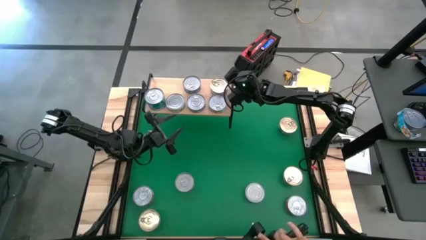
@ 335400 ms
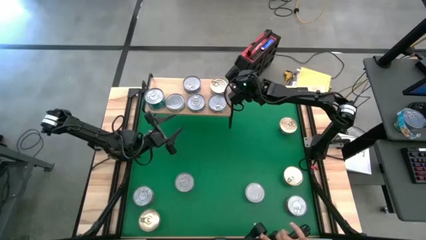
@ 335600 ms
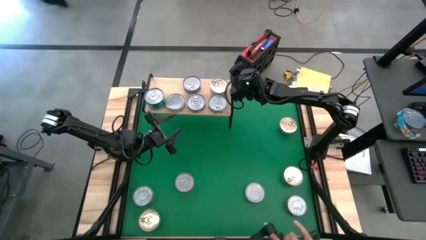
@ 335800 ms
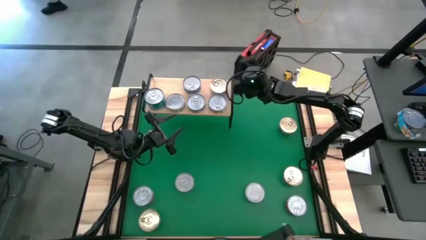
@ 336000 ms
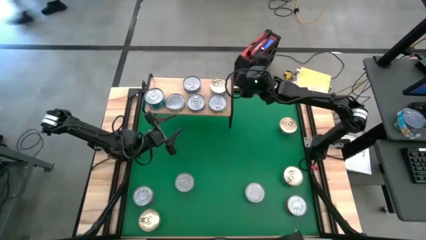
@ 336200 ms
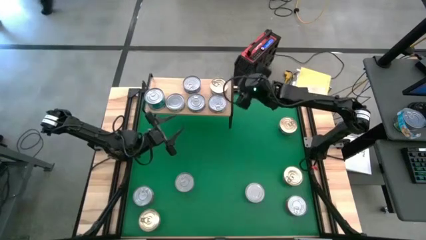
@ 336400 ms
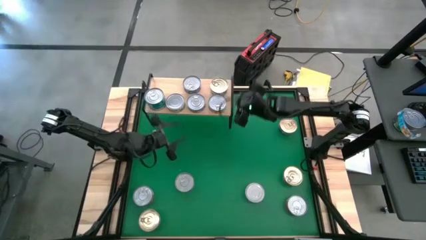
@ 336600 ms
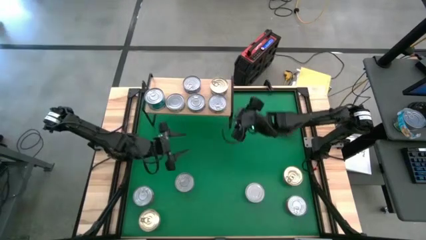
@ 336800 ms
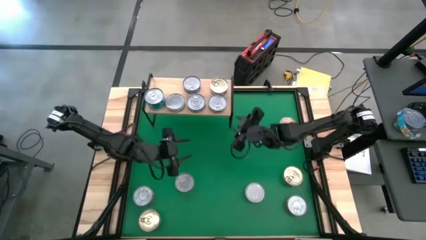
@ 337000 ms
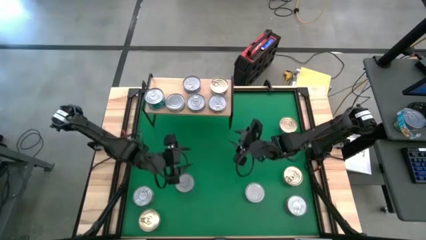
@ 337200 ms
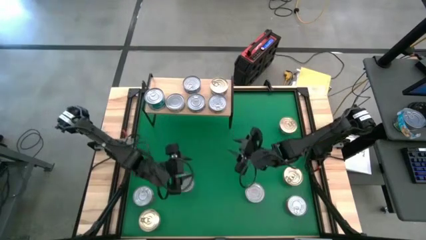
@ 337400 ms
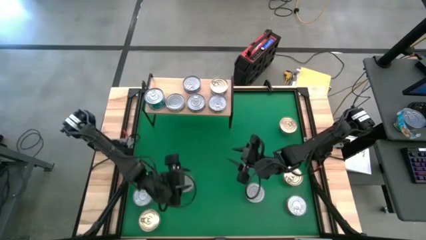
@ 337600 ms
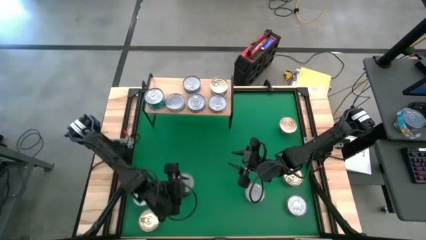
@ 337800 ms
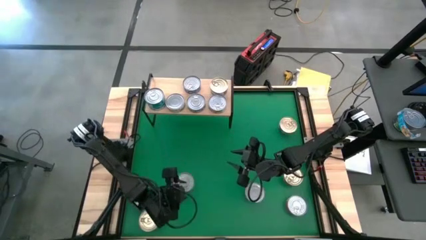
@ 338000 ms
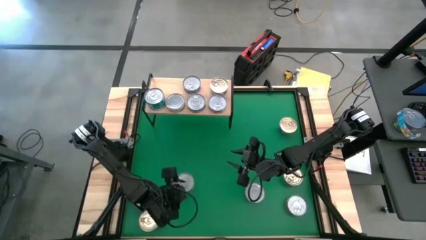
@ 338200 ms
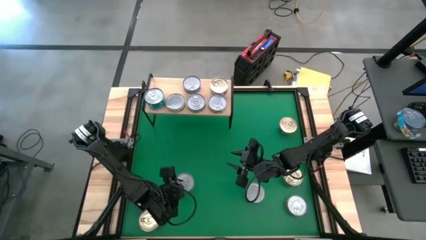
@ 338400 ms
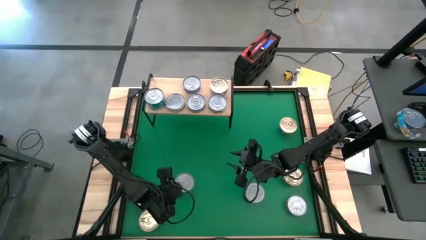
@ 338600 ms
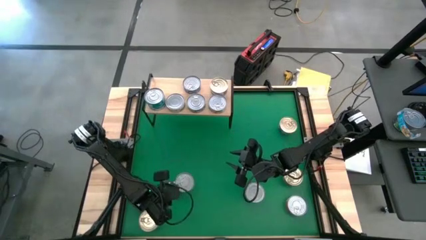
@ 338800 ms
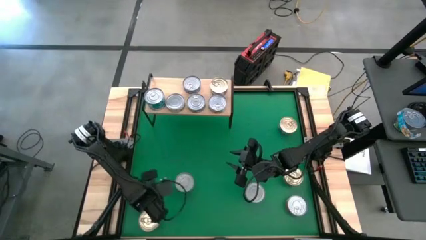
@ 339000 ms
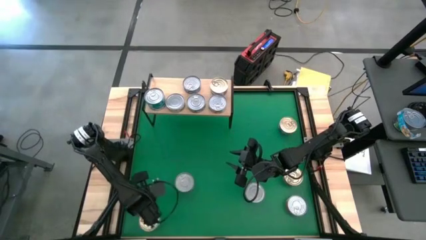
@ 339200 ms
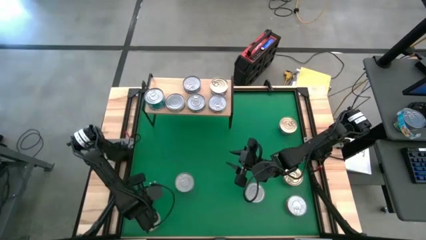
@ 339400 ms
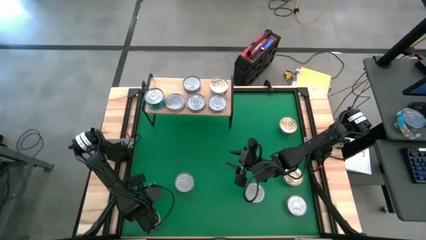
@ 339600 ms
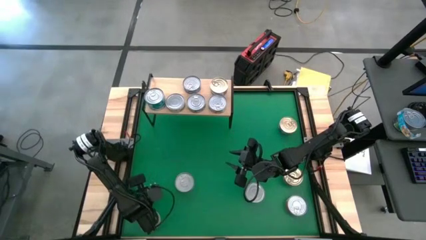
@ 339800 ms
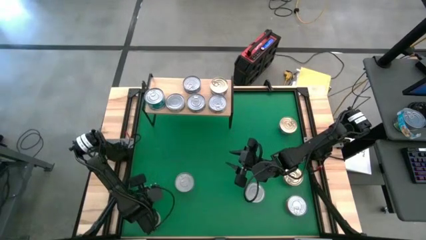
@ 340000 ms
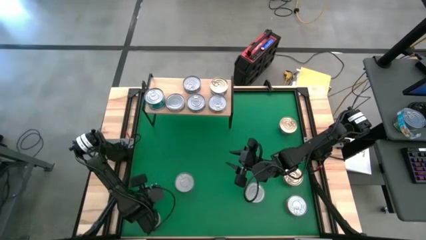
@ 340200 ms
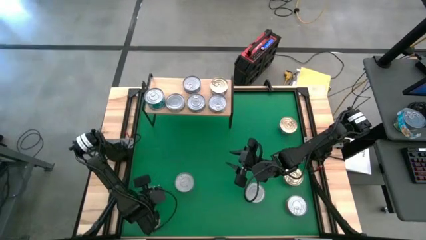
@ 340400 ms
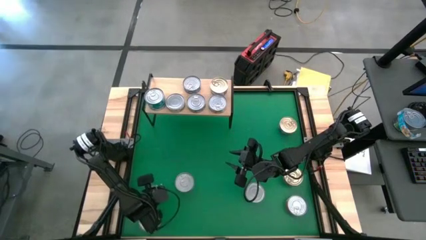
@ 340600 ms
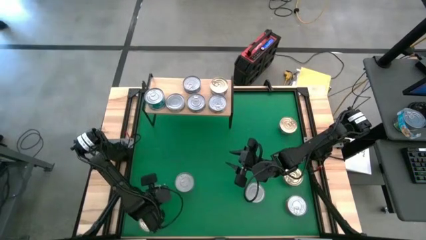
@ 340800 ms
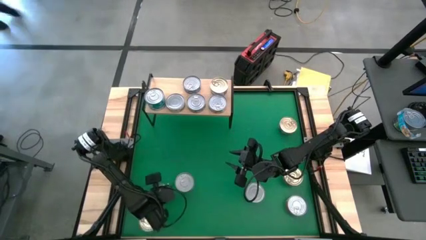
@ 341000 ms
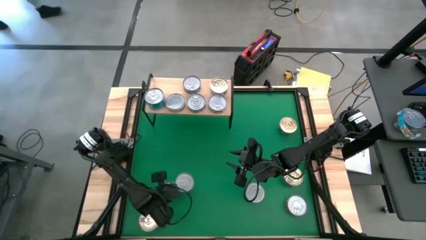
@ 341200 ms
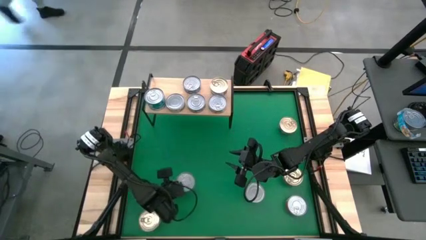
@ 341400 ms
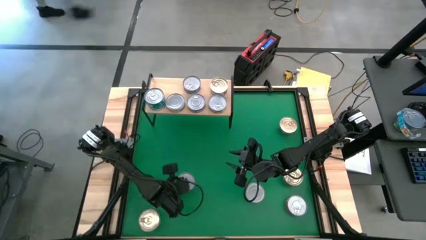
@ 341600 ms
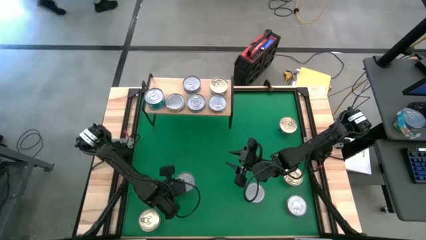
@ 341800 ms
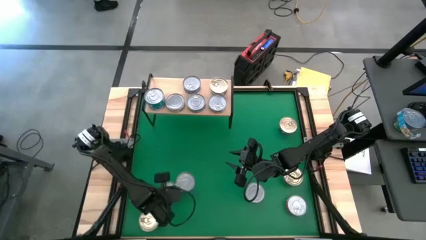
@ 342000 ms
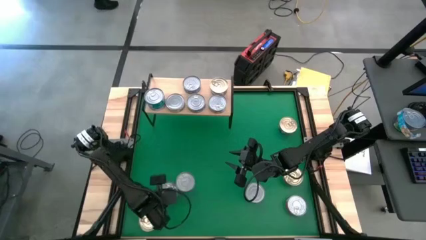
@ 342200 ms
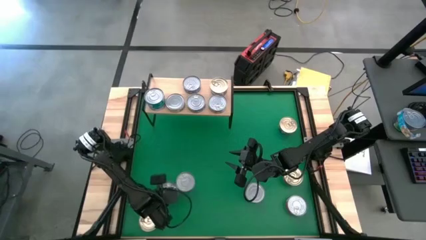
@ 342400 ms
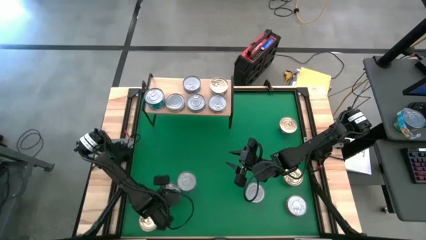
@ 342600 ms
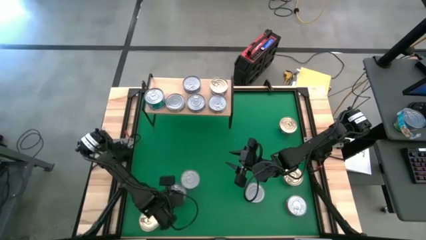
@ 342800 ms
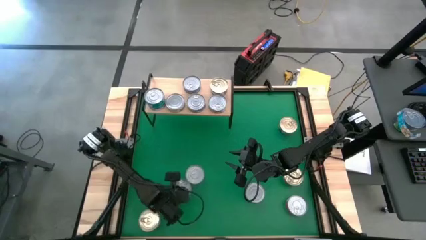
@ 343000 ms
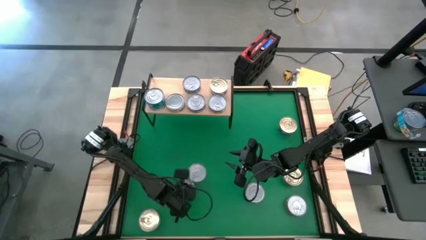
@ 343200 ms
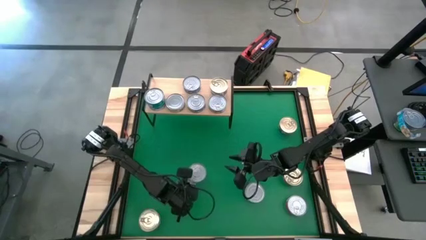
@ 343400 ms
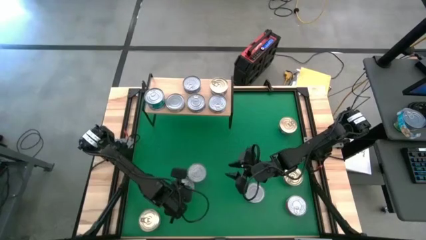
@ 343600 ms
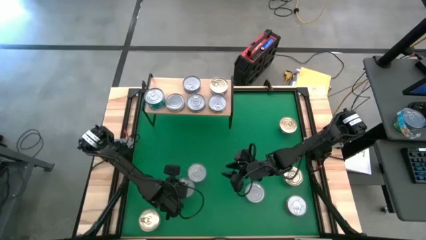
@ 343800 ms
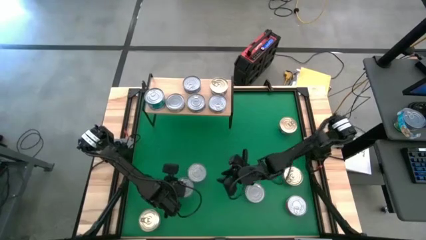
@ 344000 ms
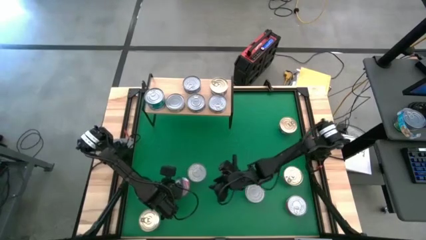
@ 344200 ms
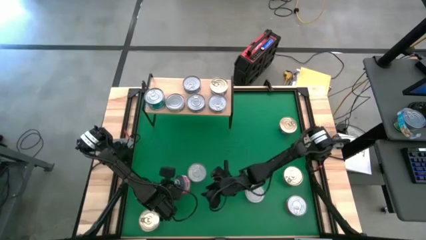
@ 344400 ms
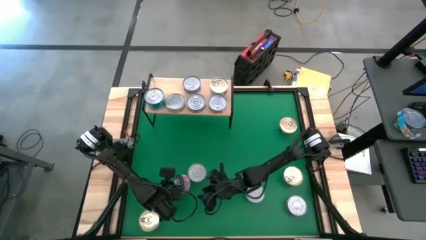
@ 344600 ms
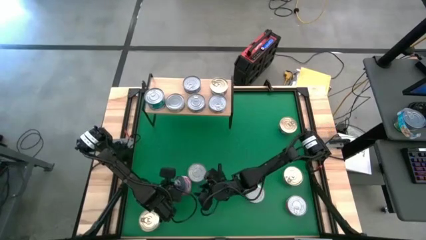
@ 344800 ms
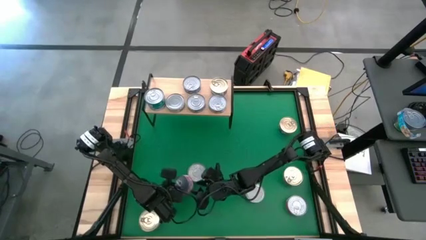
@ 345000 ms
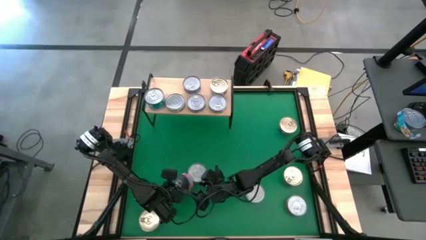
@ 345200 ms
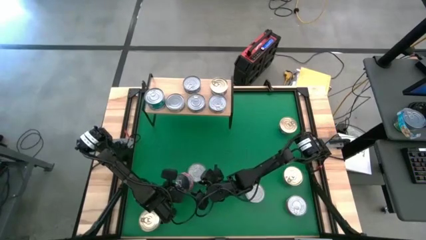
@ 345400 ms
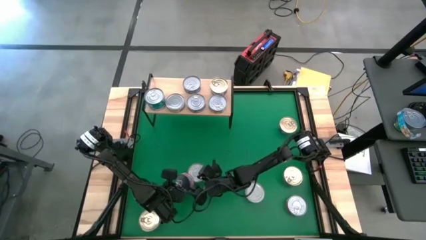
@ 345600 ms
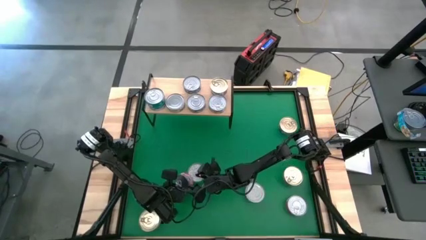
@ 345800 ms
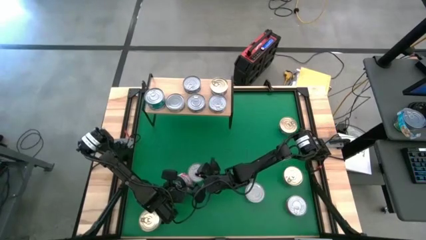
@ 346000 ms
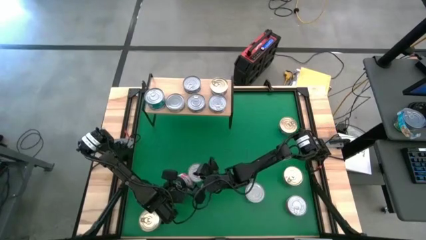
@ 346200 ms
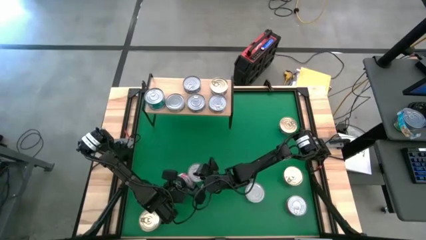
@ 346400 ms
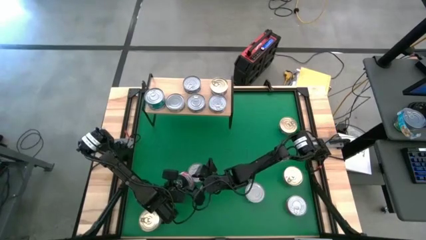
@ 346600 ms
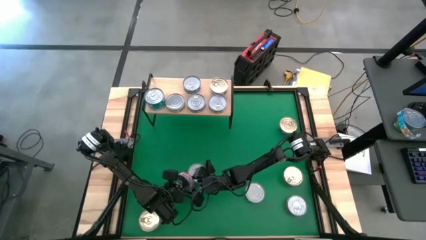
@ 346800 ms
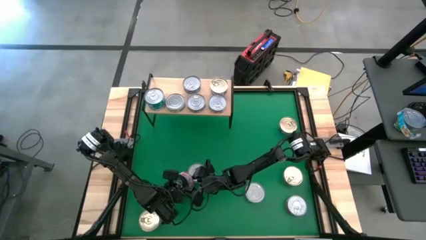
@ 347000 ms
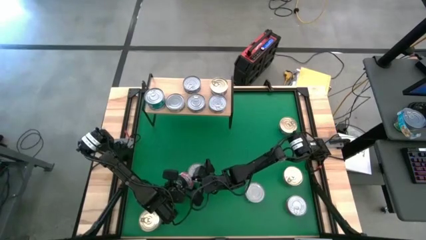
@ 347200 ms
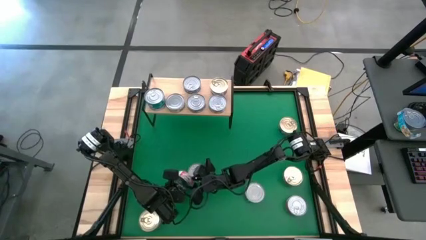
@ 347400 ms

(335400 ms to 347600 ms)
Task: Stack canned seafood by type on shelf
Put the middle left red tuna can on the shelf
